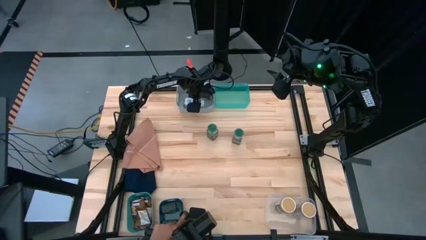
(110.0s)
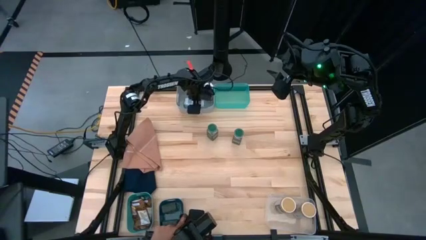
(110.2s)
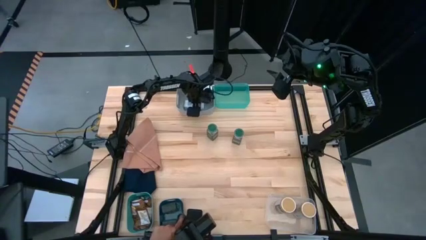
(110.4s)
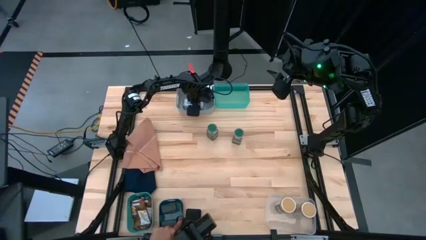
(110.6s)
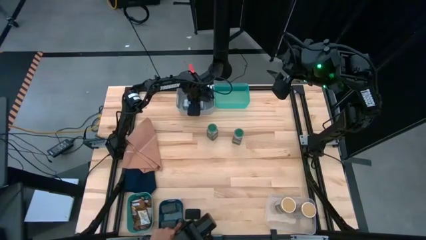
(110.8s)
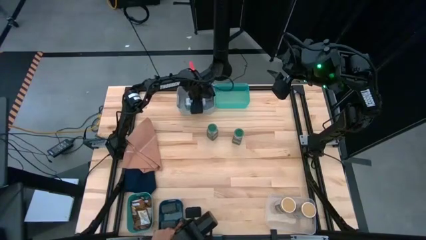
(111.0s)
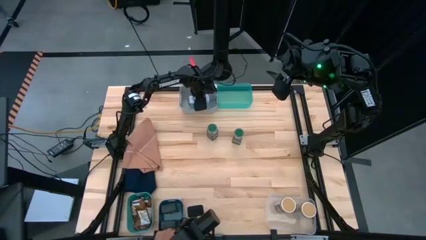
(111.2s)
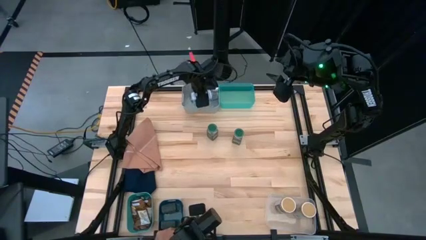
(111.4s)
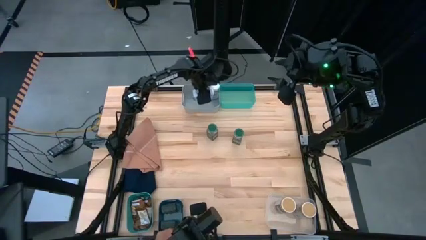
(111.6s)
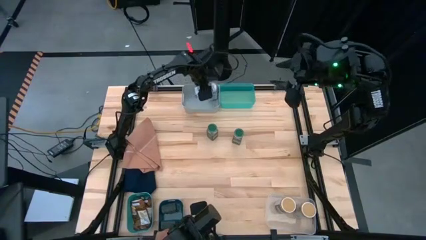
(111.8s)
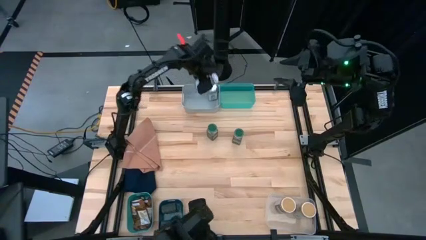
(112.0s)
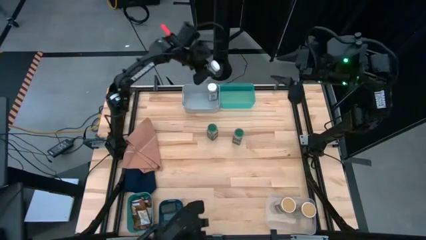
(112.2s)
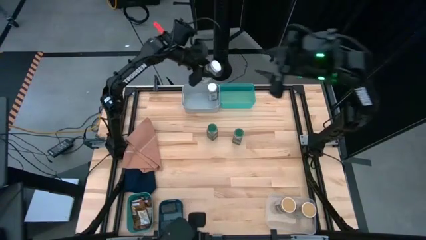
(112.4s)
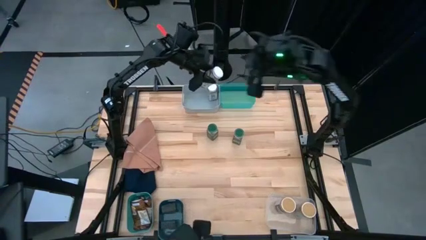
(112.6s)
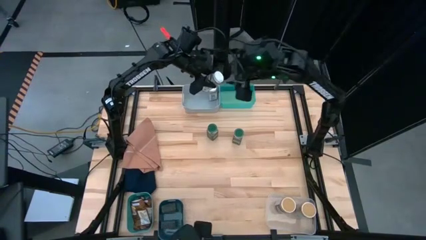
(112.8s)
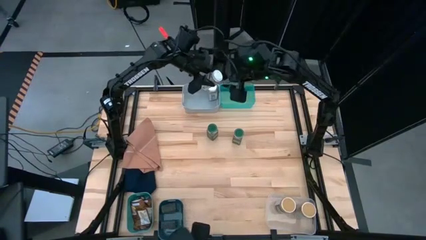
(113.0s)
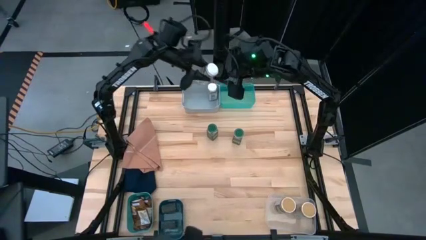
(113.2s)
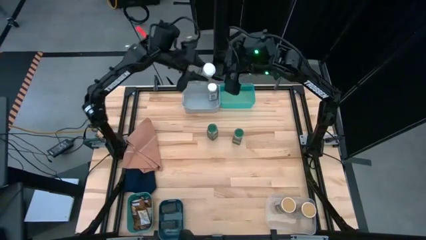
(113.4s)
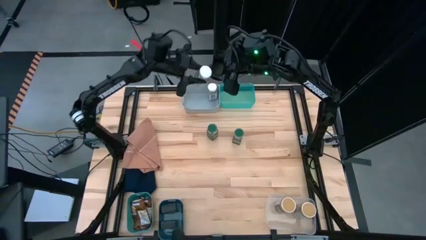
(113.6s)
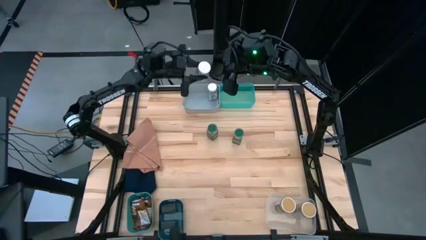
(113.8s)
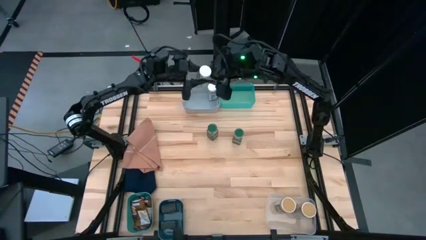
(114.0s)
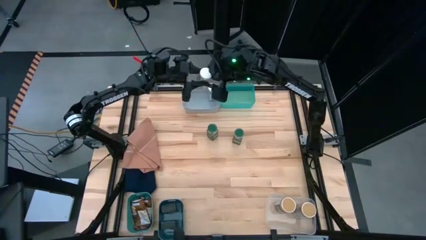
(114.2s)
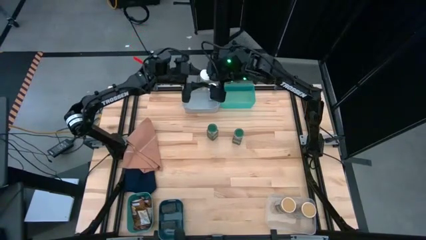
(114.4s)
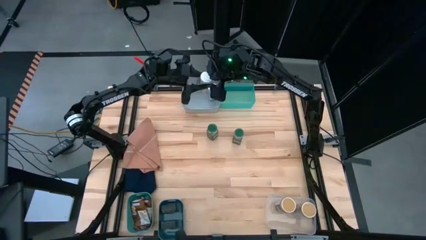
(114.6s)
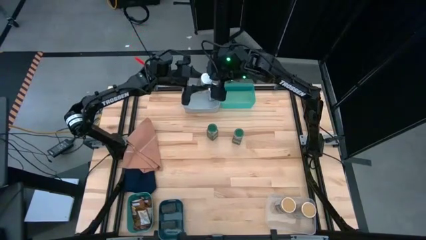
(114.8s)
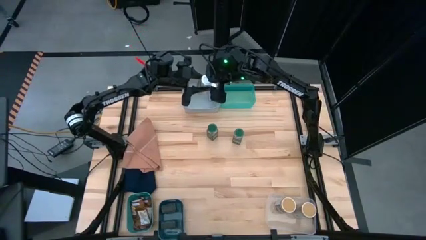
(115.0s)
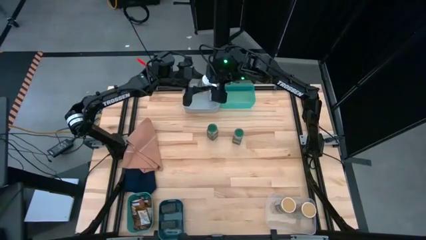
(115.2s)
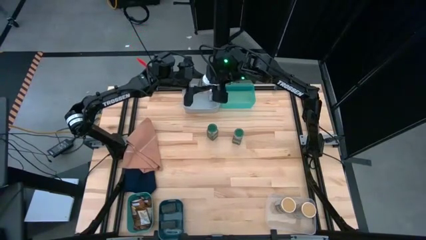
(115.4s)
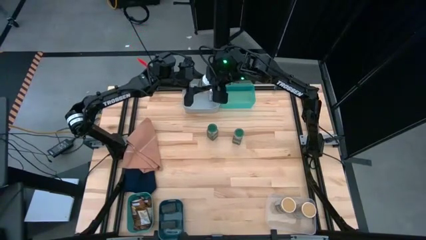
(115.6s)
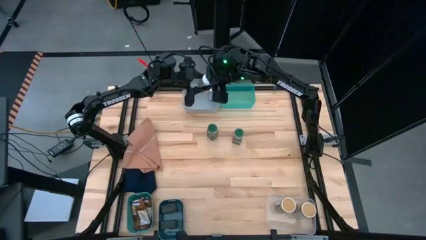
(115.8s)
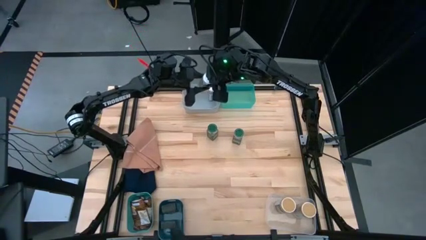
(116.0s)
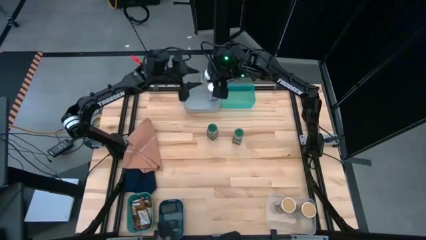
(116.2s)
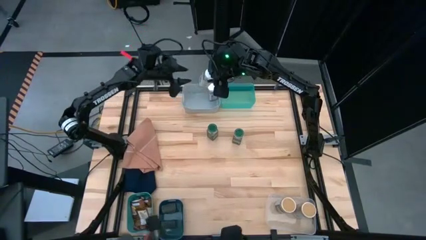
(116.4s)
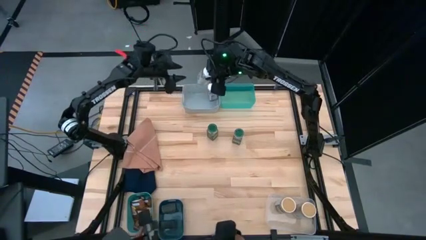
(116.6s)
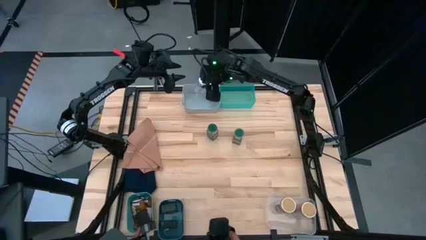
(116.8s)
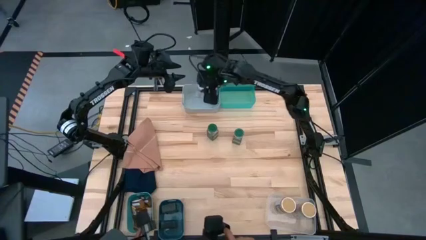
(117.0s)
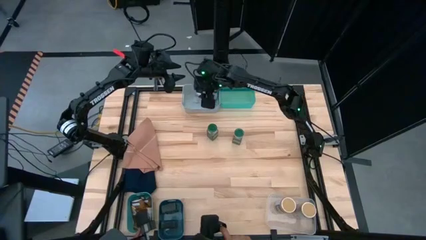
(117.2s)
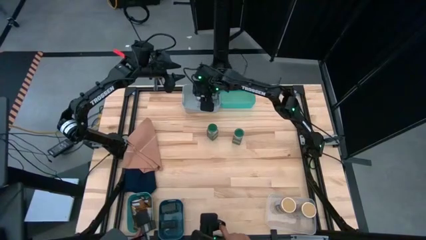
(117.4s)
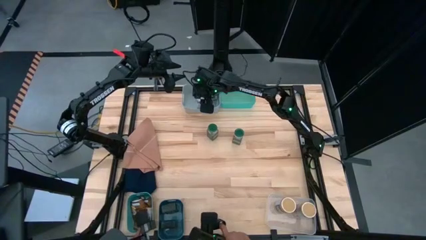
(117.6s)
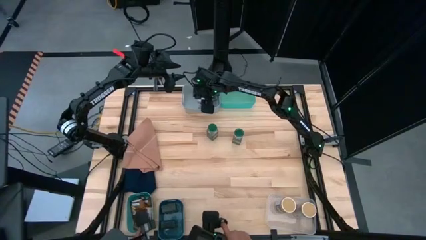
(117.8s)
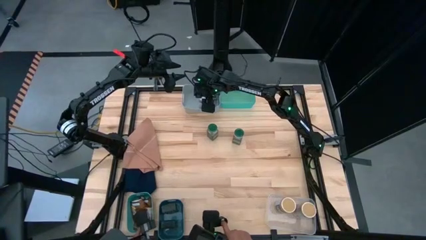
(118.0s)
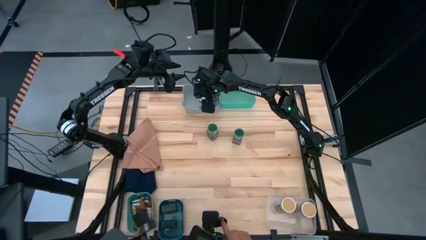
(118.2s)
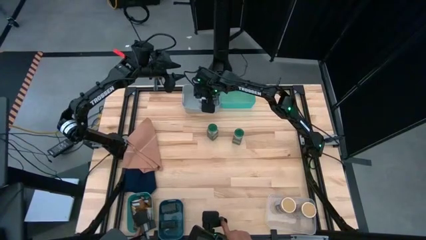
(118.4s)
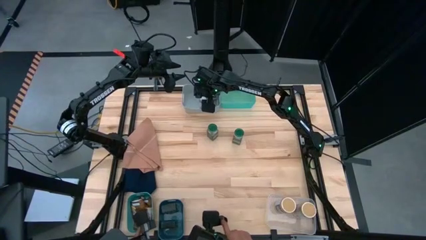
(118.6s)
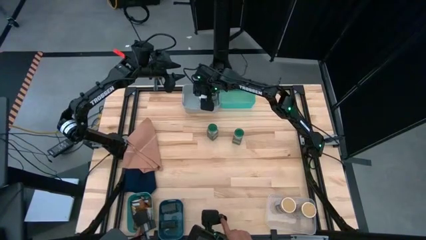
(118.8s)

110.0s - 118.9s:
Task: Sort spices by type
Put the white spice bottle into the gray bin

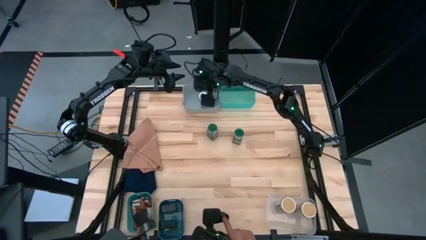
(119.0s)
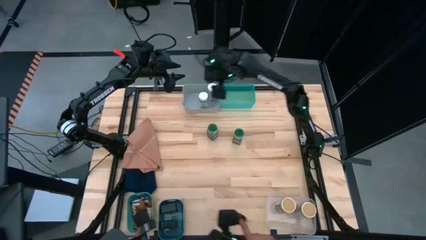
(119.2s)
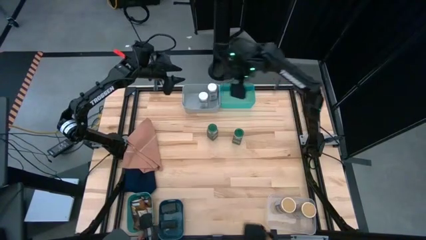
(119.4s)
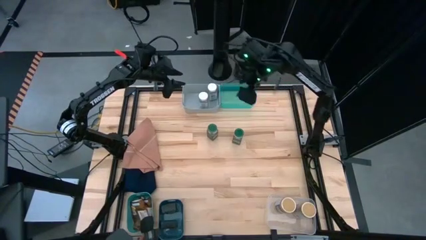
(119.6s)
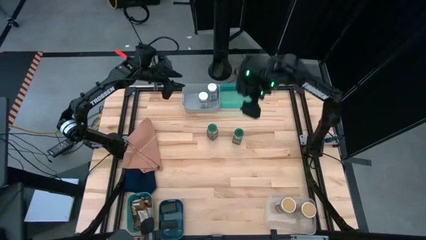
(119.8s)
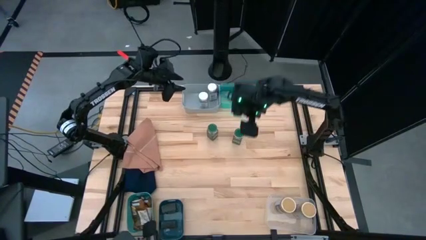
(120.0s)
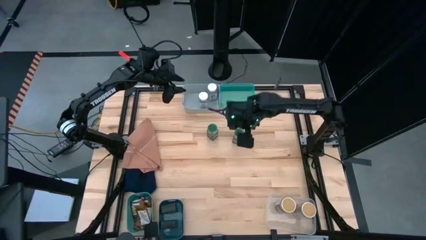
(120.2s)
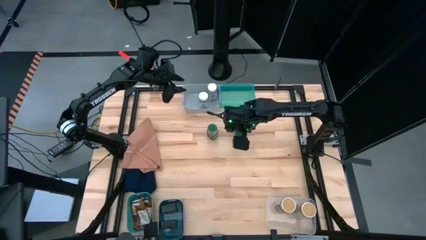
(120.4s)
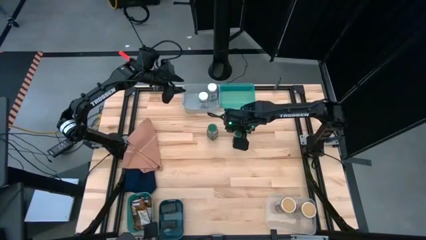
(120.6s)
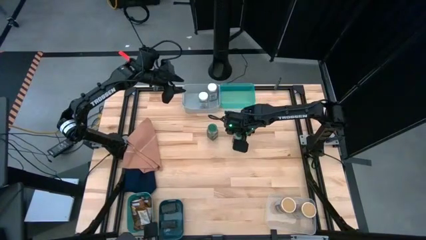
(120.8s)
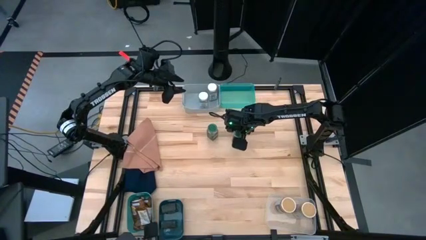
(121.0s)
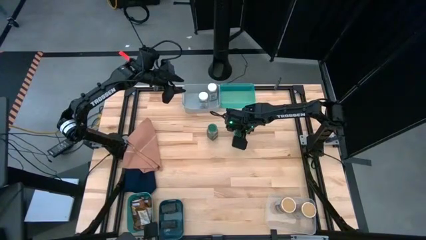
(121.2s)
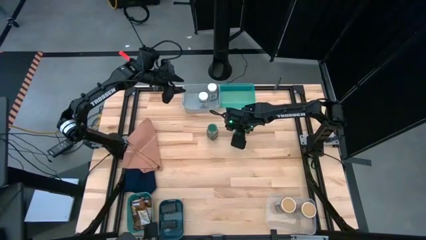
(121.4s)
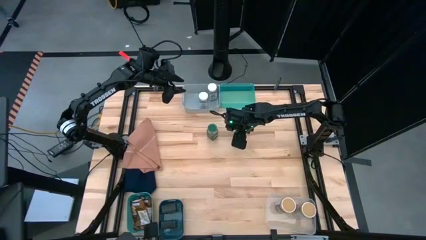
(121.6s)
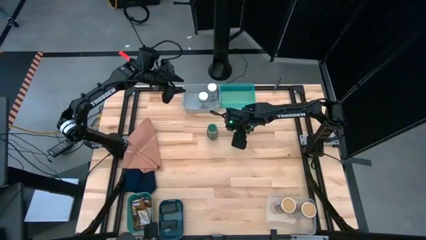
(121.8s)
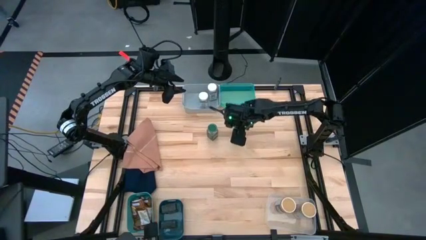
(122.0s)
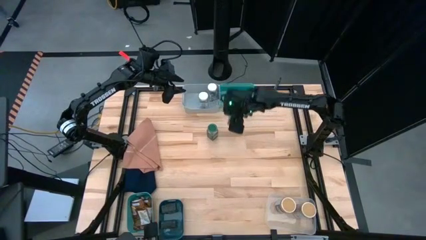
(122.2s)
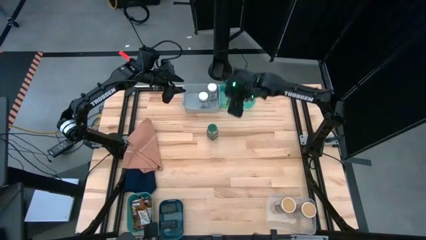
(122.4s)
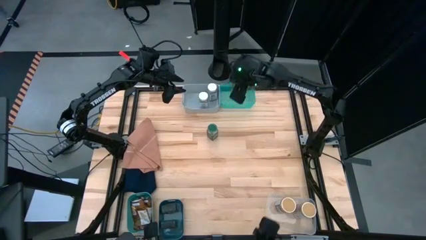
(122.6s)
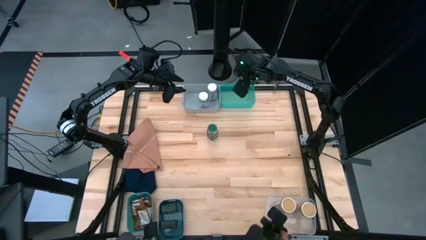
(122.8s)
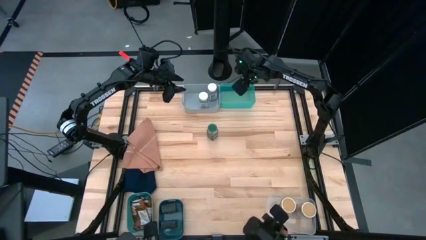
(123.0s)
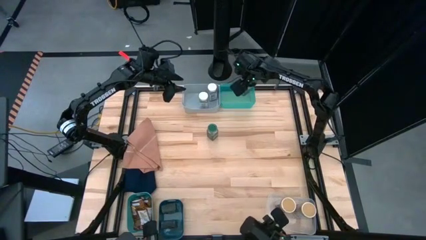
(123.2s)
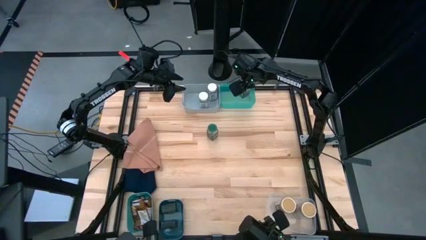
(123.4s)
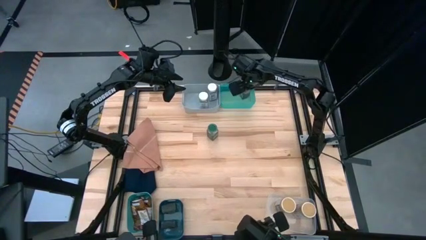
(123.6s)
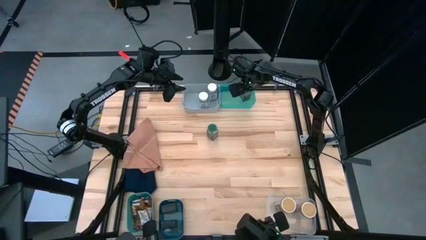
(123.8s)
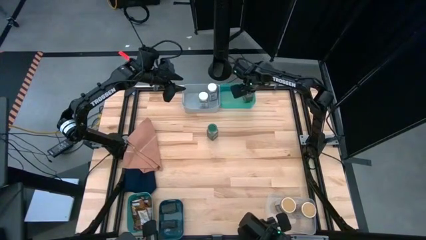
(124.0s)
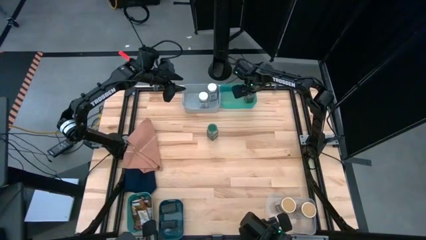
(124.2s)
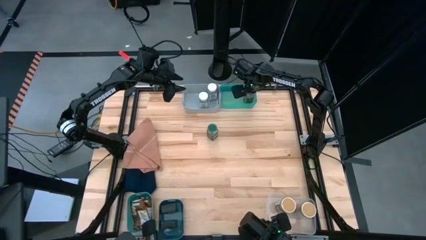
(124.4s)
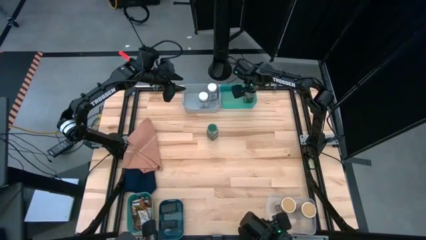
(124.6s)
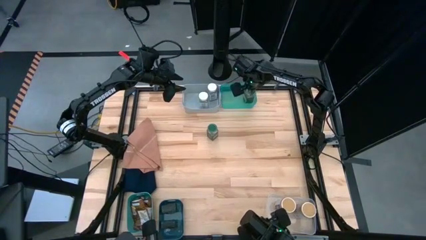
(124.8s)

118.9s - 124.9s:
Put the right green spice bottle into the blue bin
